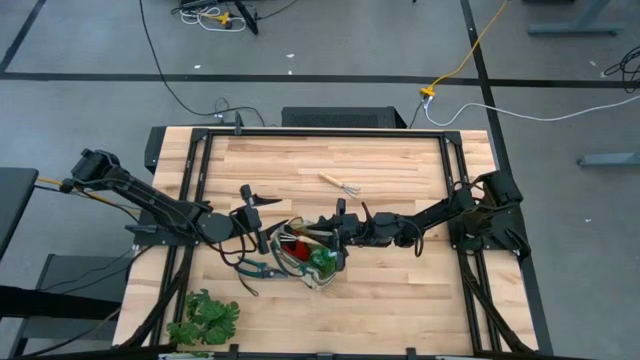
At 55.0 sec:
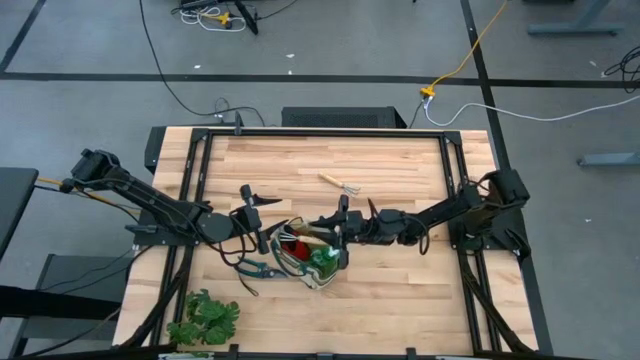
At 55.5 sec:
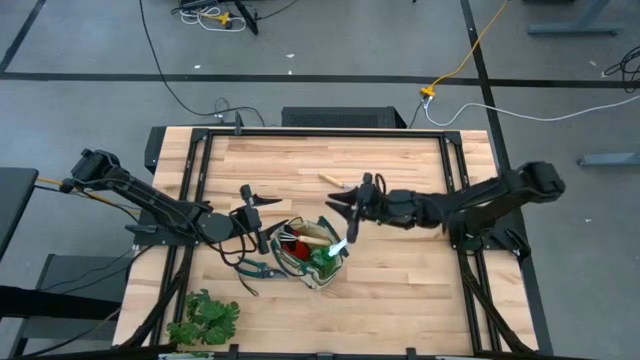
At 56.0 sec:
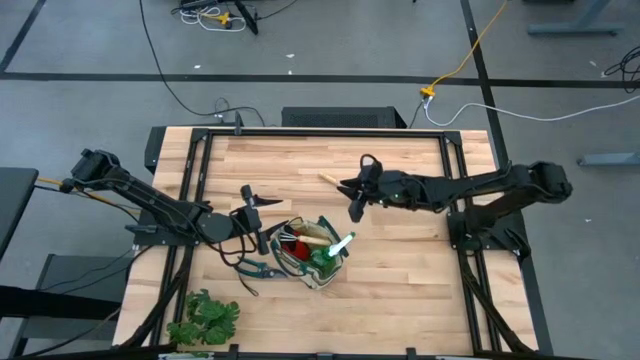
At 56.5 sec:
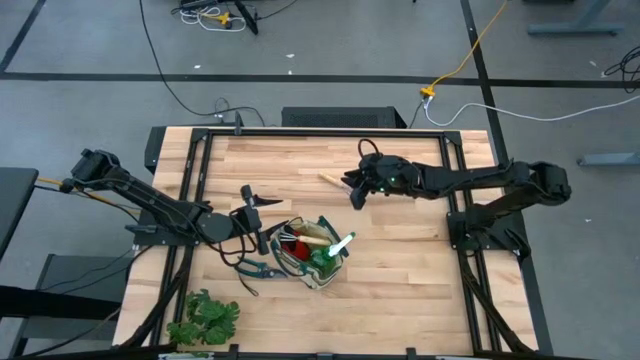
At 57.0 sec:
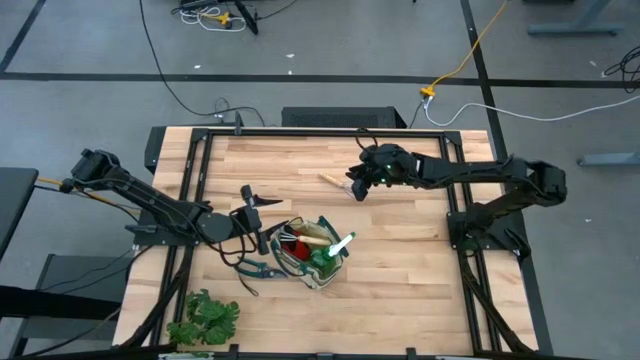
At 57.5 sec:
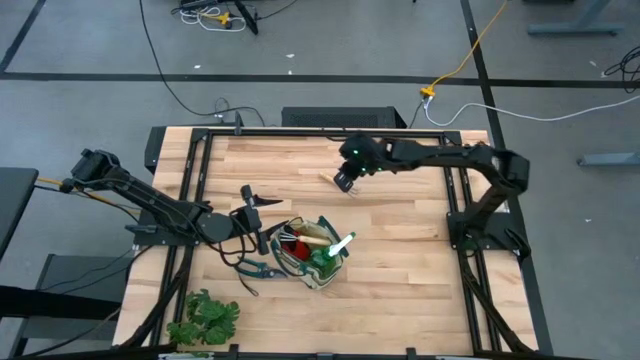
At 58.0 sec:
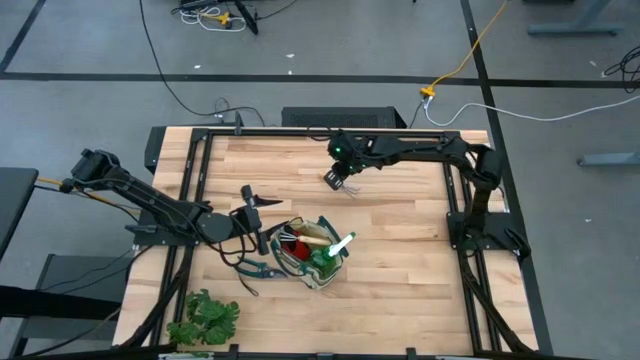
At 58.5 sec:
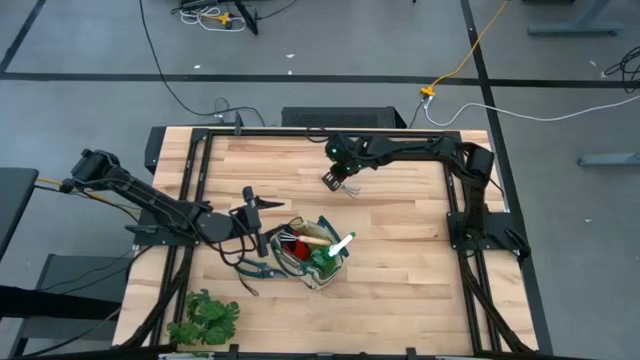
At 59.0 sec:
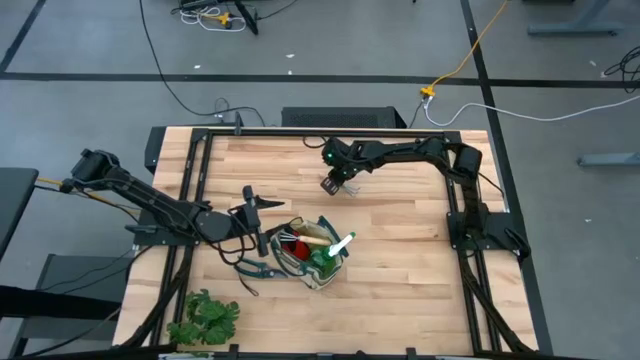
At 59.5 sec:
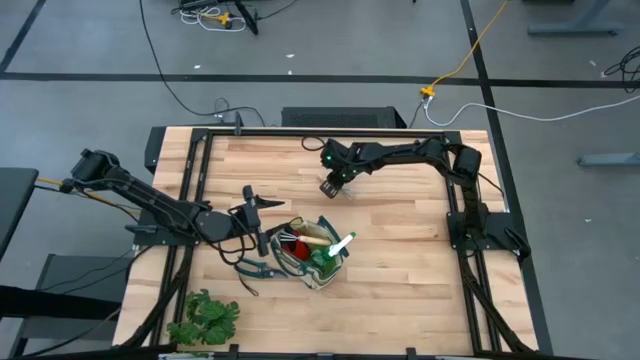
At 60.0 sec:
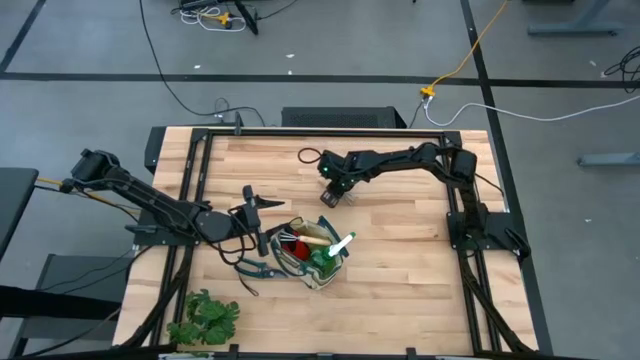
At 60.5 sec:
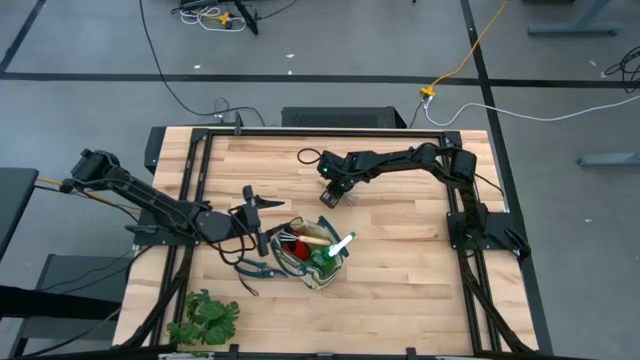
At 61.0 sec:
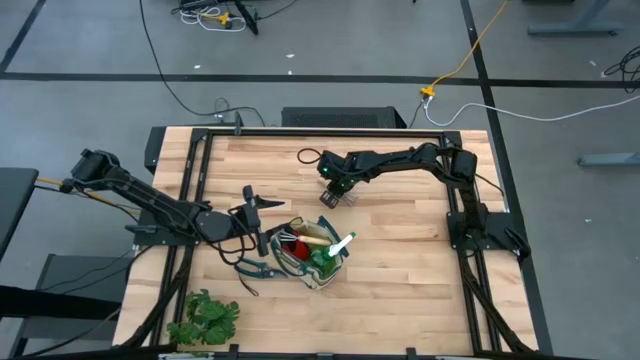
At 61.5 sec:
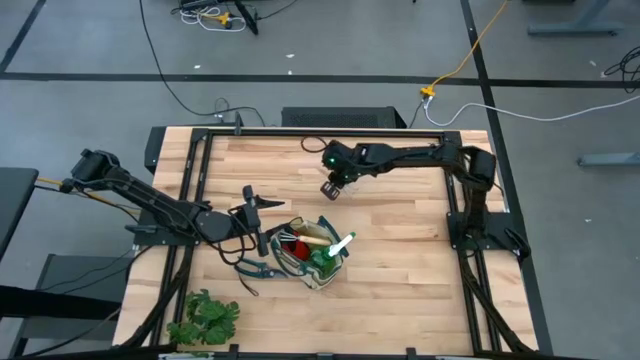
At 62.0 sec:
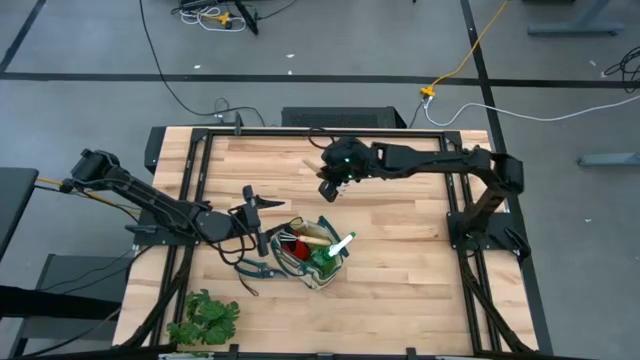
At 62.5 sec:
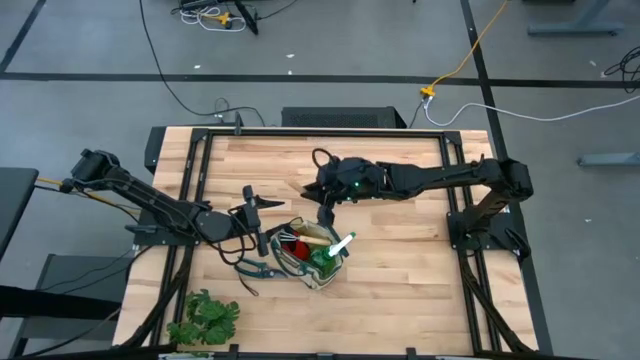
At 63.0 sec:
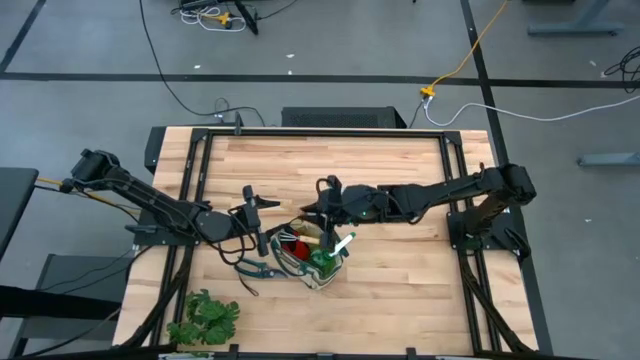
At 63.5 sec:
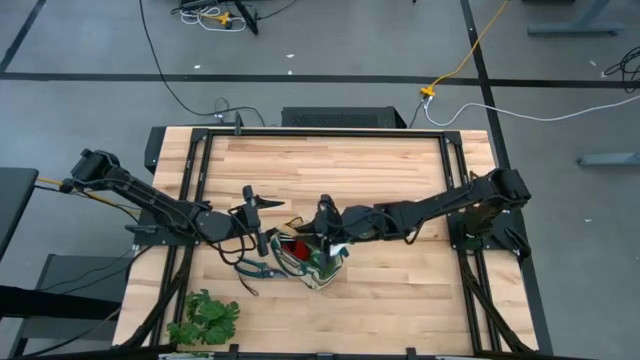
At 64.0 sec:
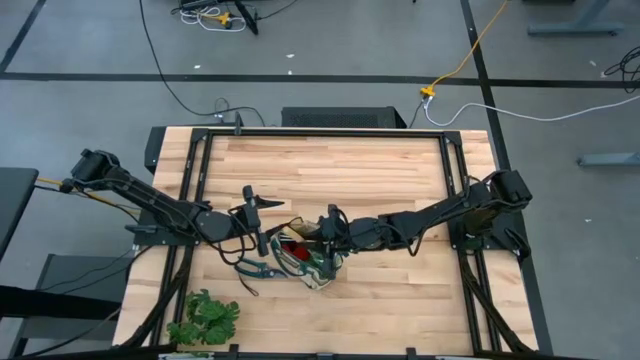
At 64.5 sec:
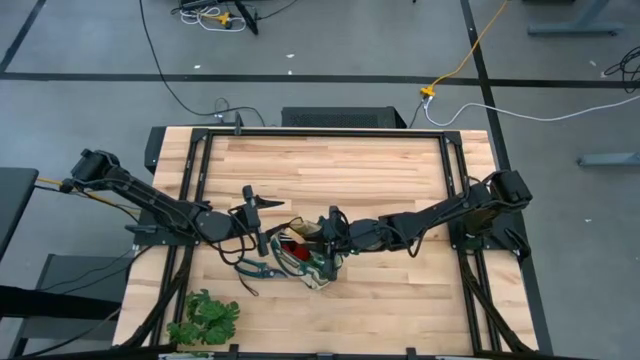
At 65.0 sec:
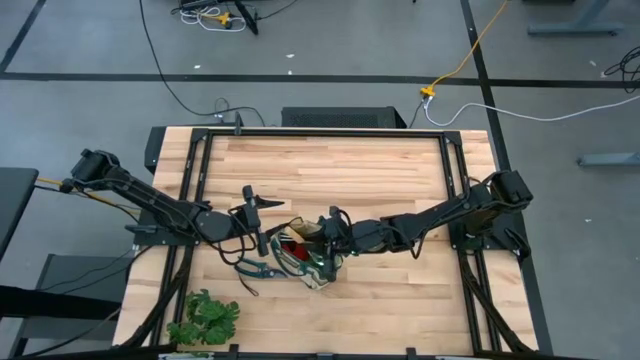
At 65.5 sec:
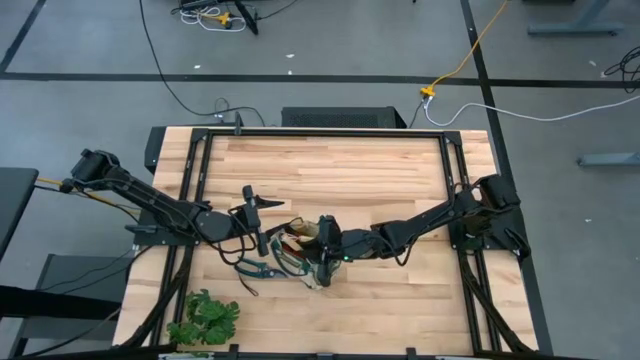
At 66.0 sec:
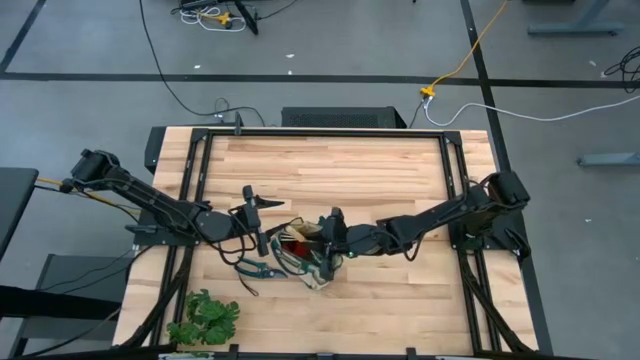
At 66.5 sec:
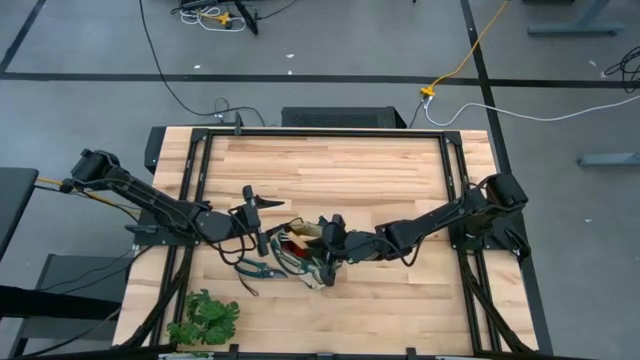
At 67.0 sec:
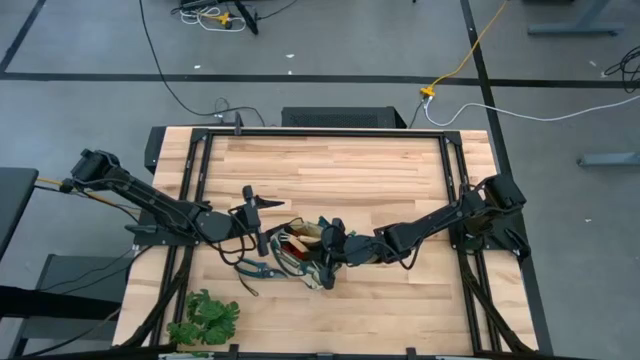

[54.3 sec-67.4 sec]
Task: Pick & Place Garden tools in Gardening bag
Put the brown hand rake into the gardening bag

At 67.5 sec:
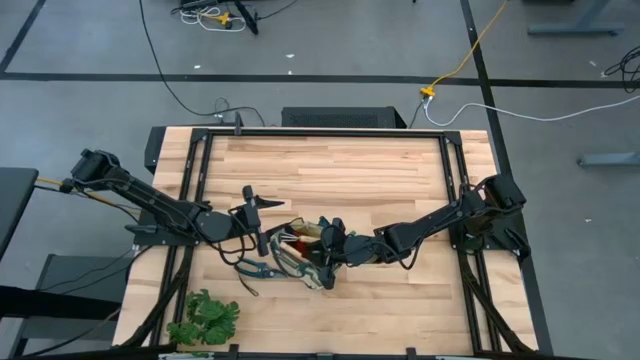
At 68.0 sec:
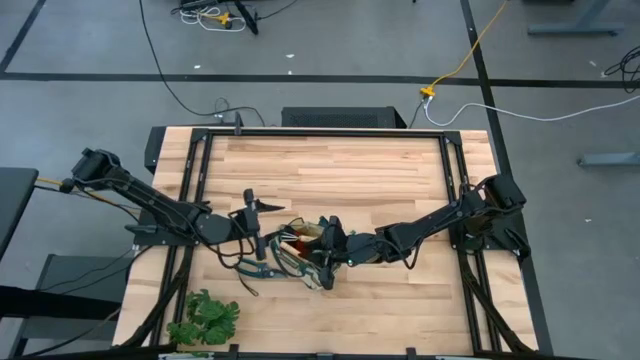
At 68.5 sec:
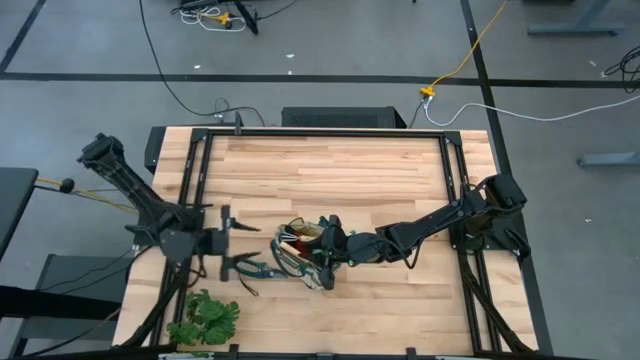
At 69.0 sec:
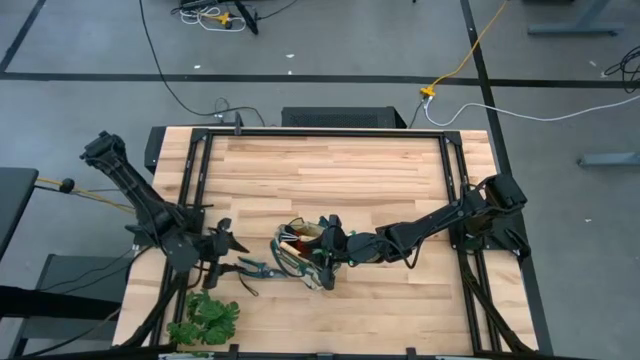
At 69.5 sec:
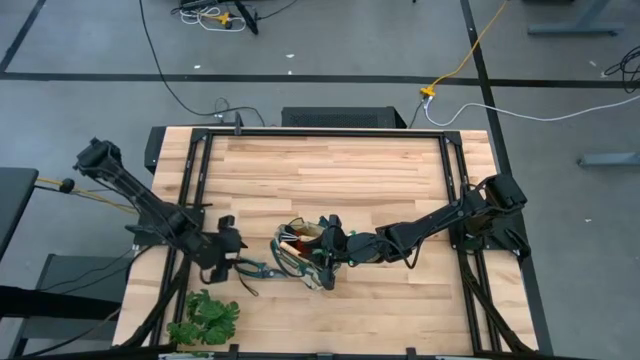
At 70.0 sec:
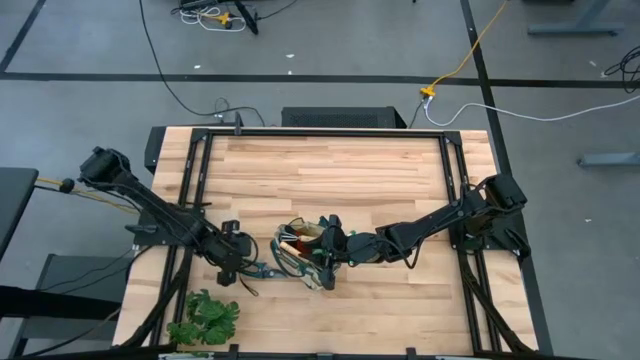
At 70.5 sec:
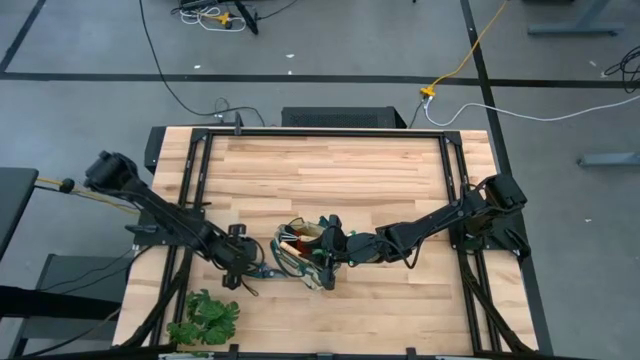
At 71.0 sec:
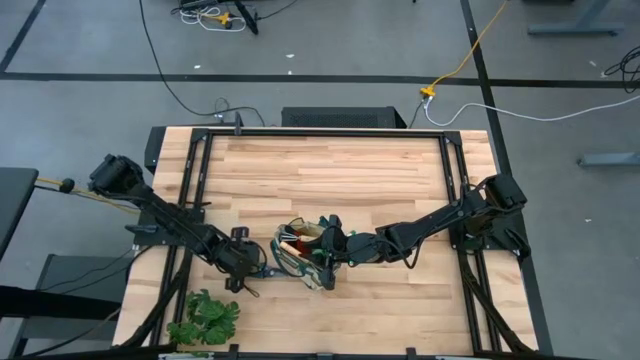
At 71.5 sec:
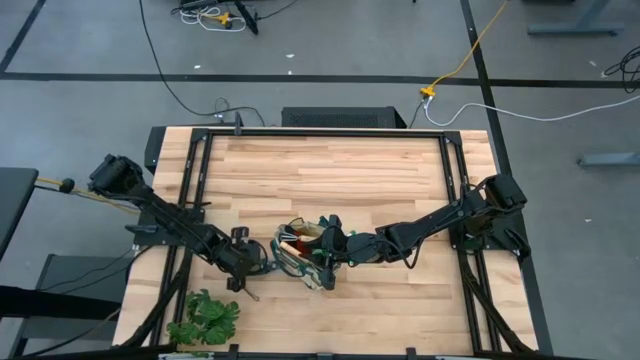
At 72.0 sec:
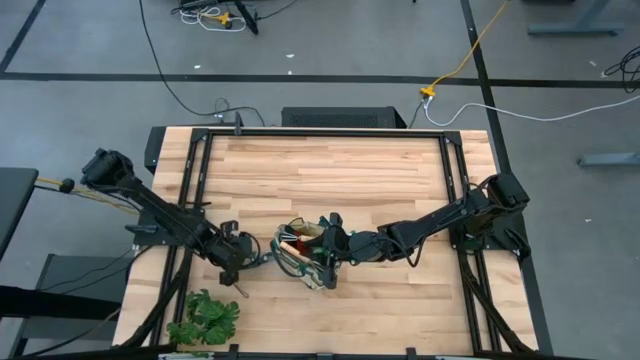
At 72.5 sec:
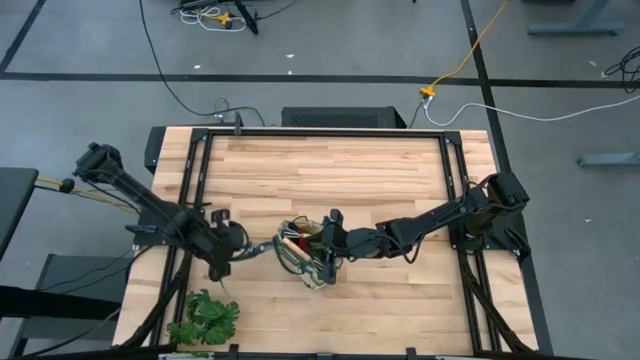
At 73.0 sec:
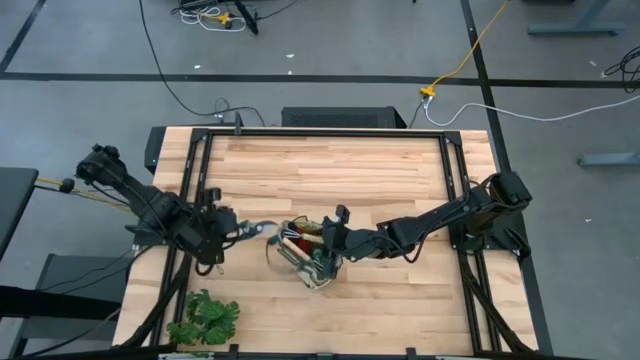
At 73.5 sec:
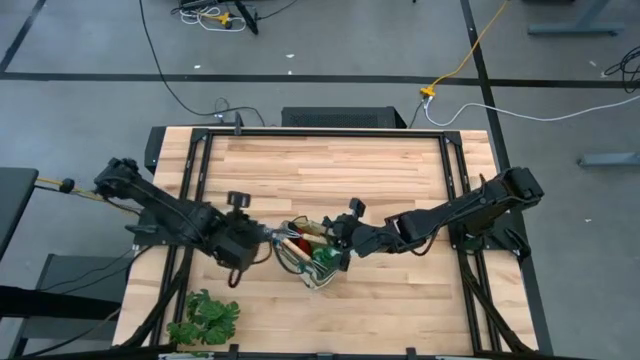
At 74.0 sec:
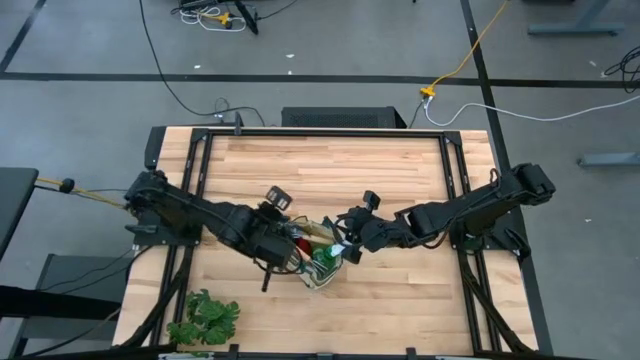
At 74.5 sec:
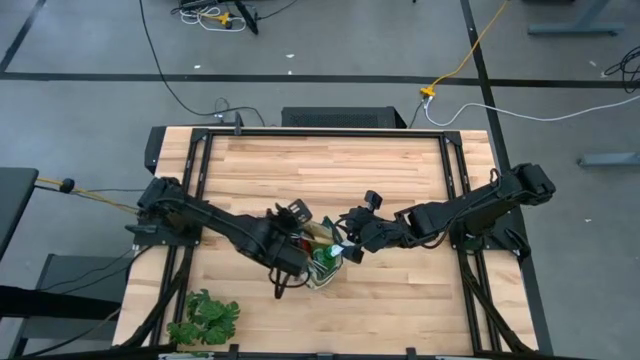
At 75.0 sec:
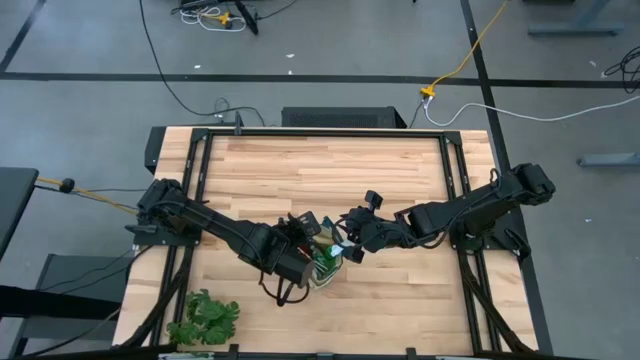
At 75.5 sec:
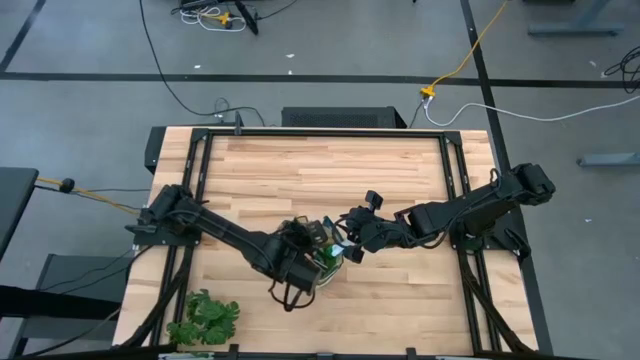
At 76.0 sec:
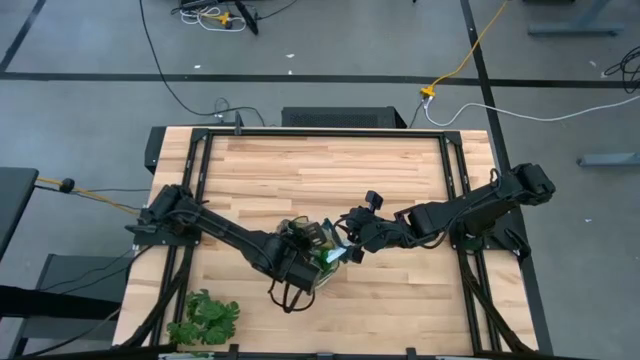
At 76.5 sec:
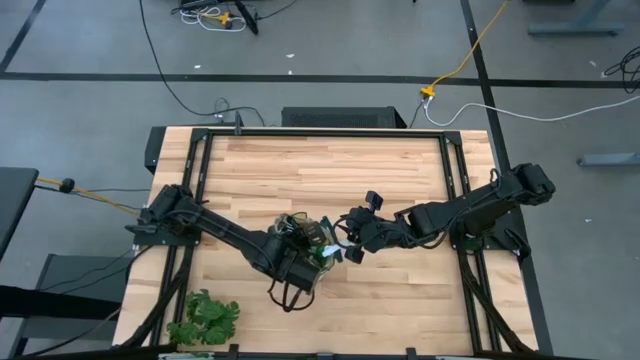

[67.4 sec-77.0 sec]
Put the green shear scissors into the gardening bag
